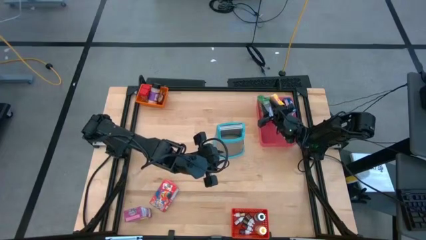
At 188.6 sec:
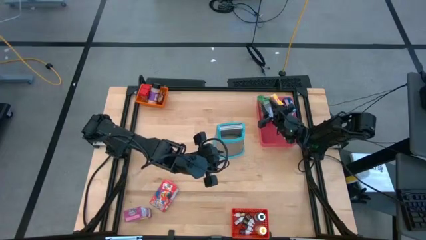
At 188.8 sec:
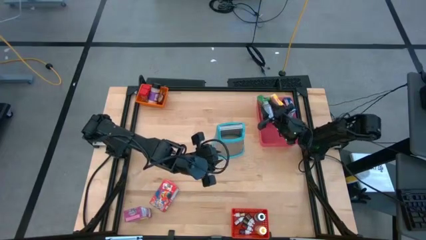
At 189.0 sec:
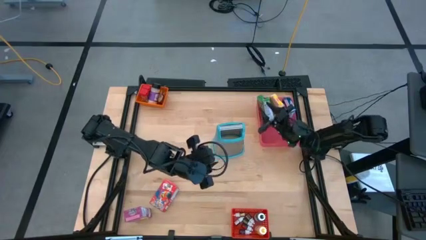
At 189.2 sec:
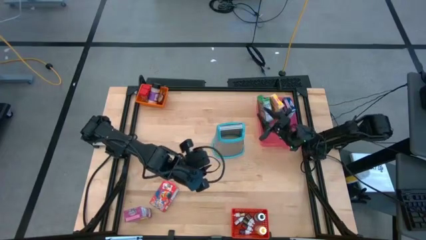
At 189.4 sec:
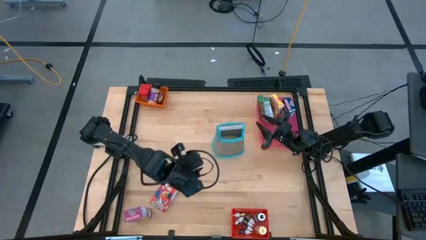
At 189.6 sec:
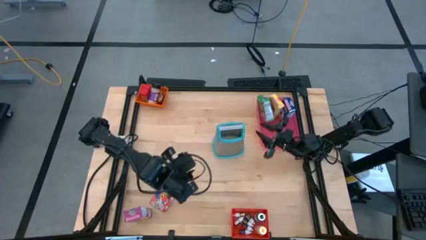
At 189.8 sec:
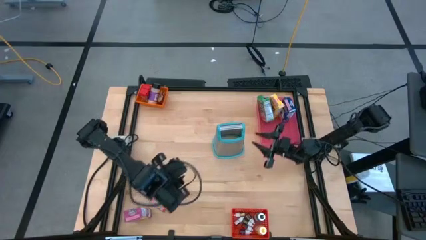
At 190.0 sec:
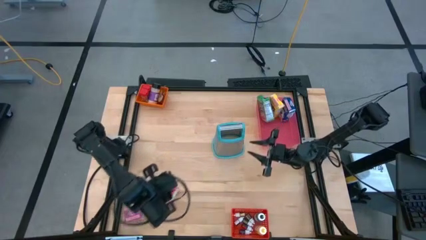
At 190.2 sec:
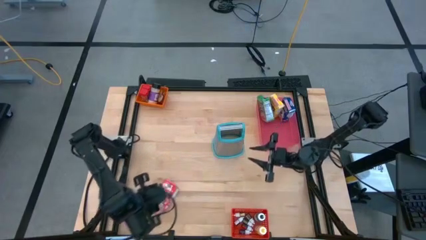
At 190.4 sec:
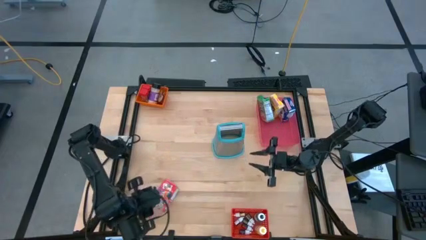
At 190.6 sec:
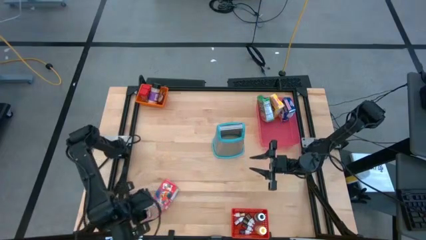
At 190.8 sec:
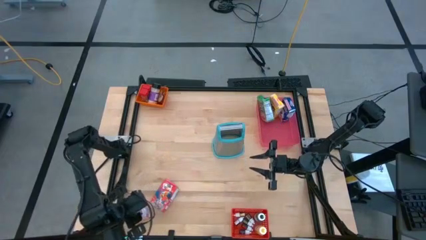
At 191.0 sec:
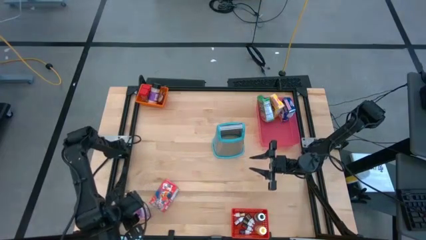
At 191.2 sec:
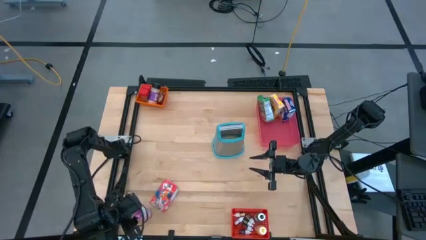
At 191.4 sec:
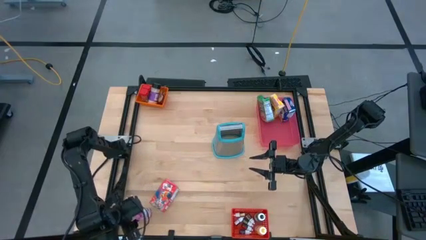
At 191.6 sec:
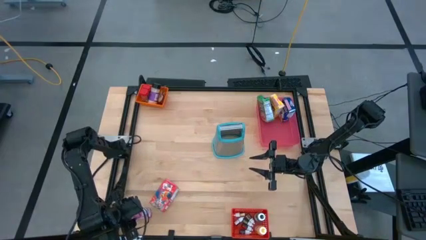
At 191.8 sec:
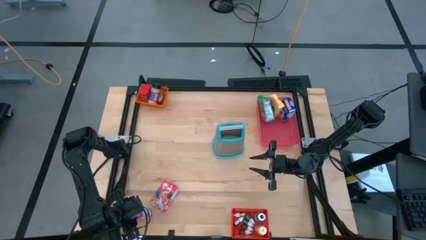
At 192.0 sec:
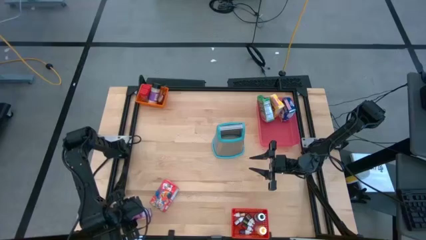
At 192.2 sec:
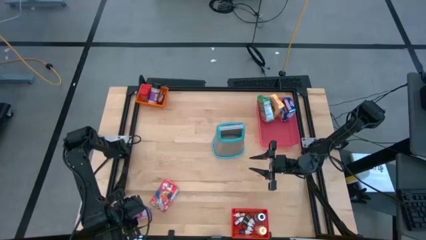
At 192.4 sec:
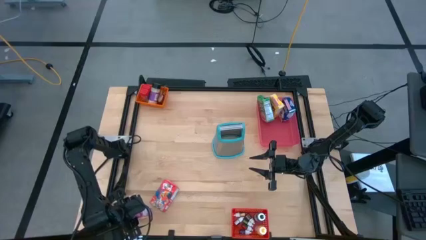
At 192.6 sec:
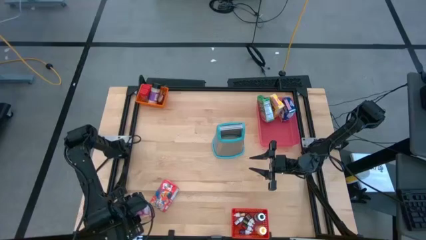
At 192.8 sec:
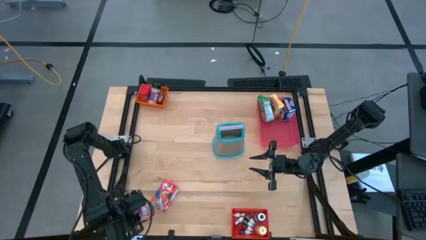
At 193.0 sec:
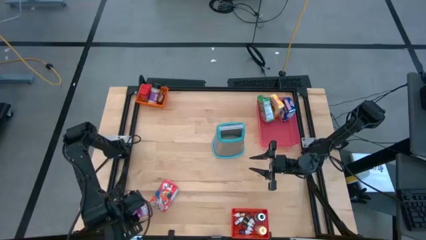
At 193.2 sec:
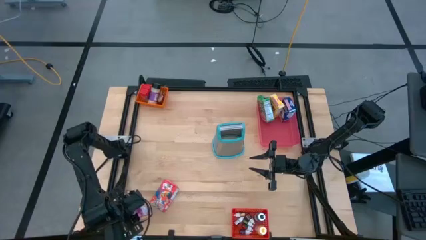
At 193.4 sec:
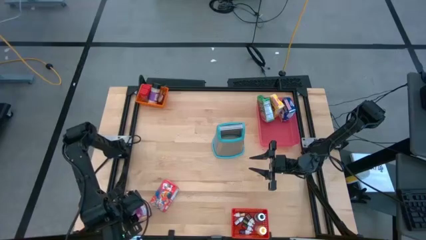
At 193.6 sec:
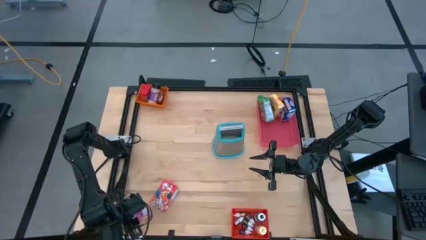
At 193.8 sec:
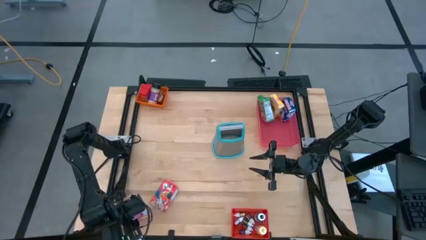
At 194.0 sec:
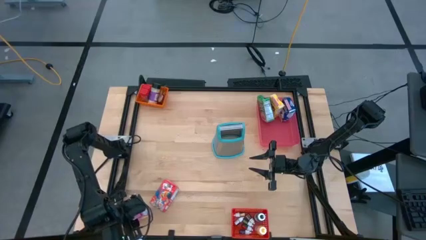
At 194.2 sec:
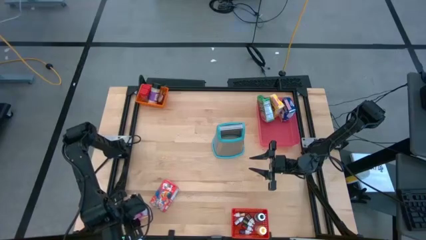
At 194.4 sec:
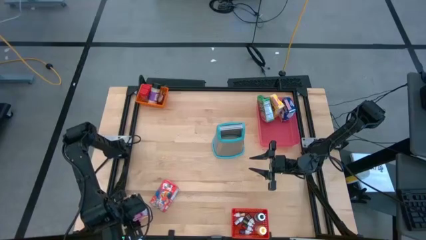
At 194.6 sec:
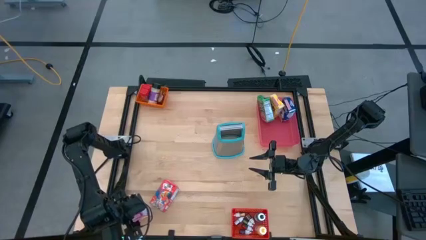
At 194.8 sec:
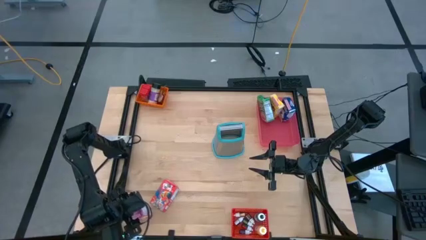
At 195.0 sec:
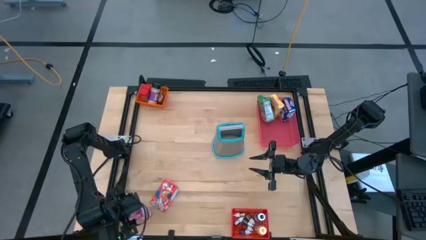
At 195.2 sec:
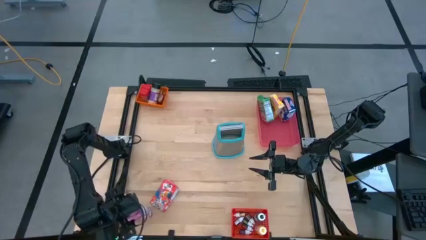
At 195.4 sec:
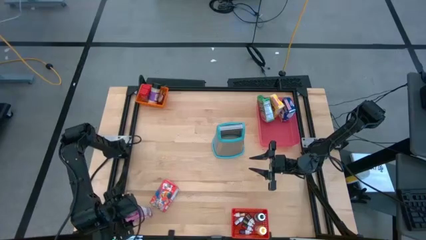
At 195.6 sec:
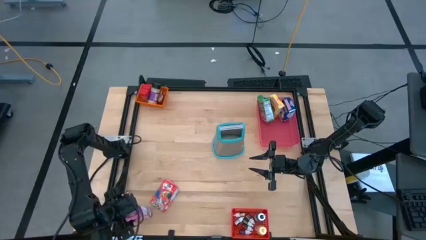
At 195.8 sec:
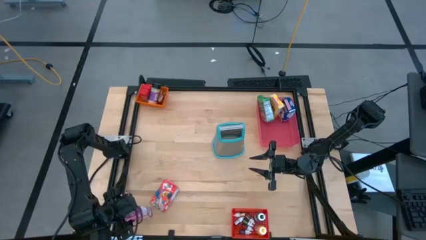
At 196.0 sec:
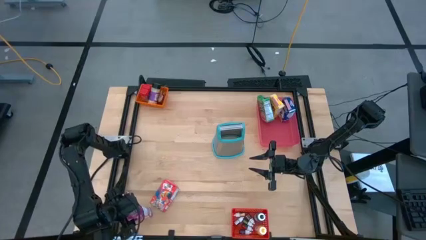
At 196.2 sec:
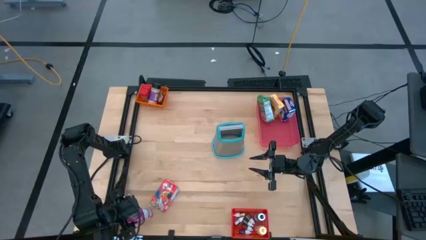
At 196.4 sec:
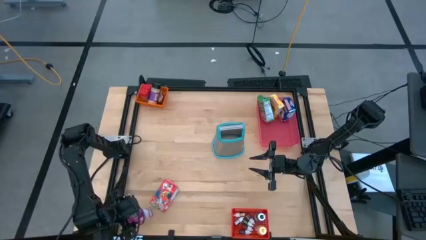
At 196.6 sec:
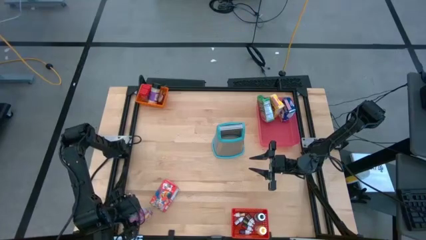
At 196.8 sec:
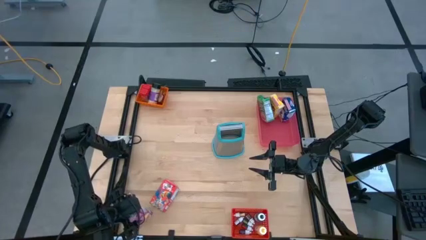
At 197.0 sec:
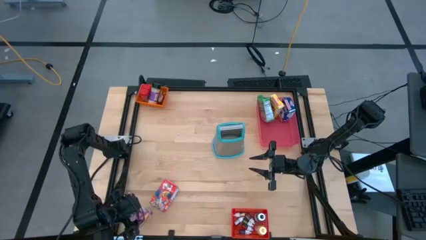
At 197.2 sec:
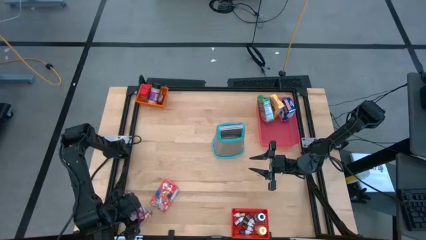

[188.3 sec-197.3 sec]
Task: Pick & Place Kitchen Items
Put the purple cereal box into the pink bin

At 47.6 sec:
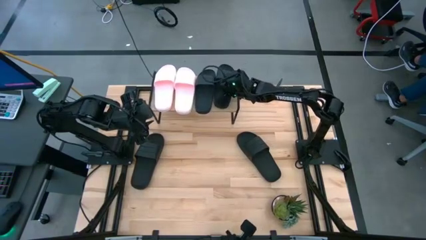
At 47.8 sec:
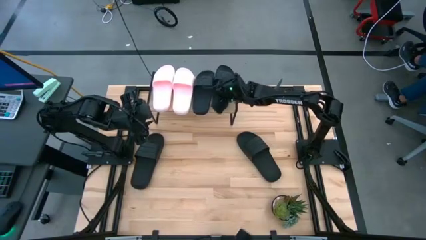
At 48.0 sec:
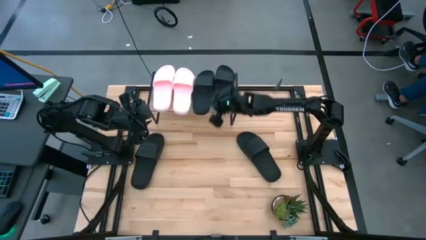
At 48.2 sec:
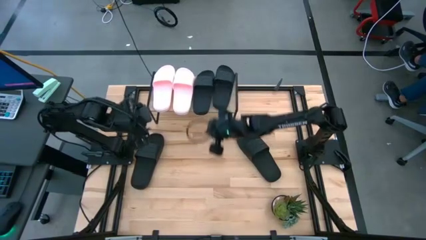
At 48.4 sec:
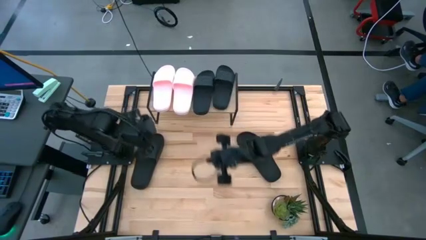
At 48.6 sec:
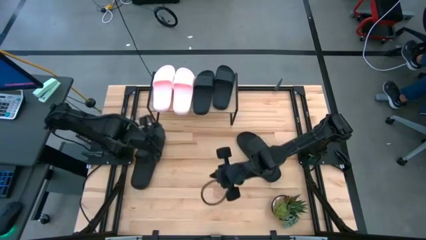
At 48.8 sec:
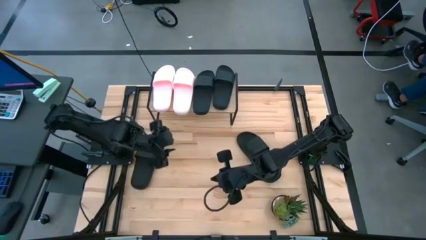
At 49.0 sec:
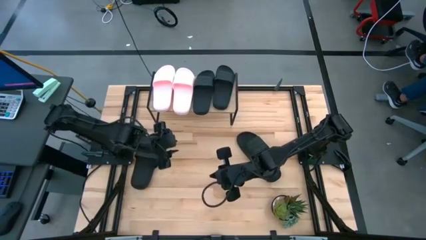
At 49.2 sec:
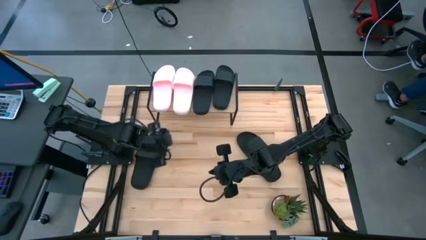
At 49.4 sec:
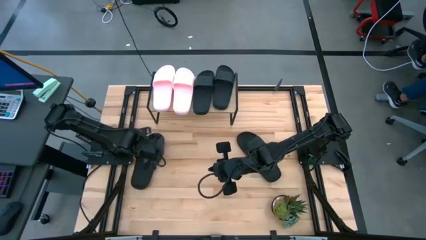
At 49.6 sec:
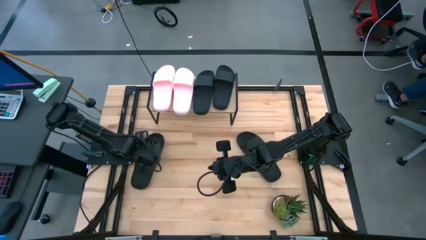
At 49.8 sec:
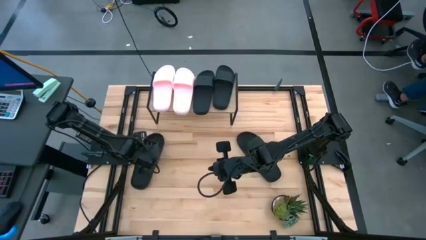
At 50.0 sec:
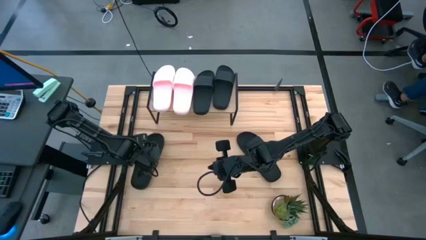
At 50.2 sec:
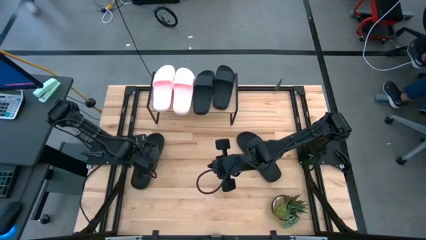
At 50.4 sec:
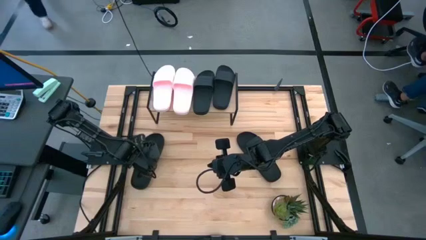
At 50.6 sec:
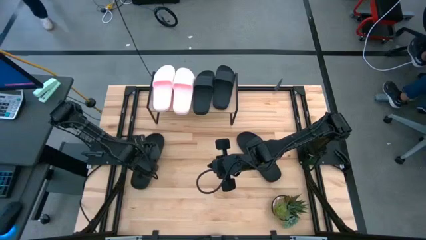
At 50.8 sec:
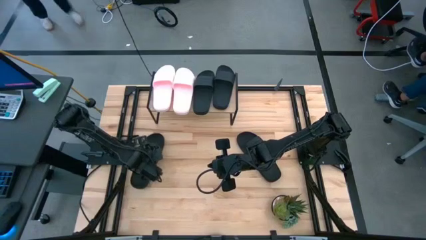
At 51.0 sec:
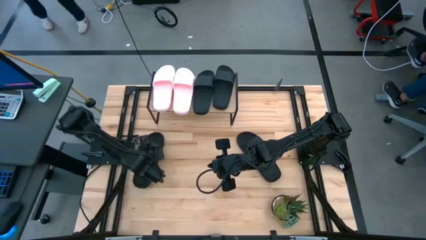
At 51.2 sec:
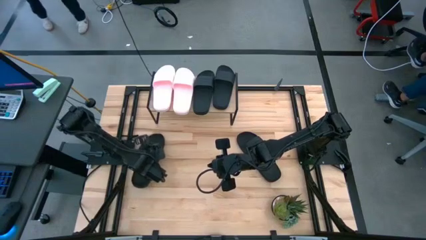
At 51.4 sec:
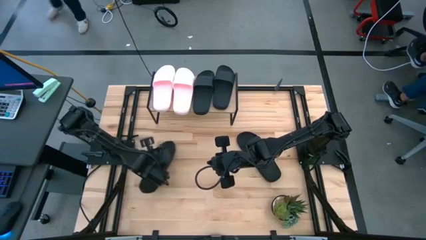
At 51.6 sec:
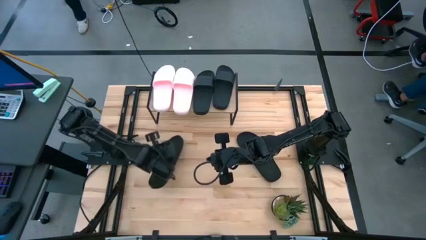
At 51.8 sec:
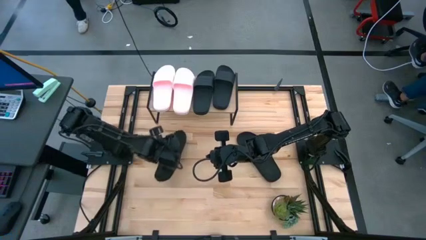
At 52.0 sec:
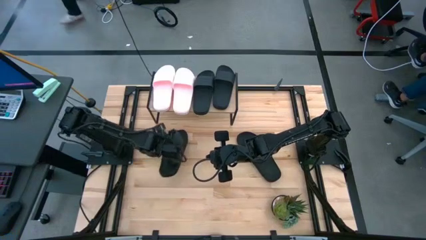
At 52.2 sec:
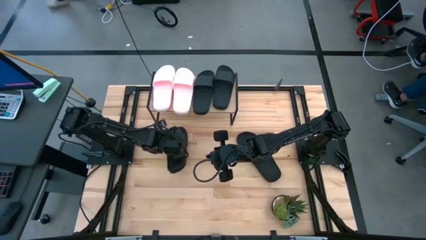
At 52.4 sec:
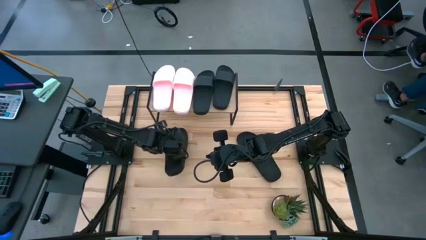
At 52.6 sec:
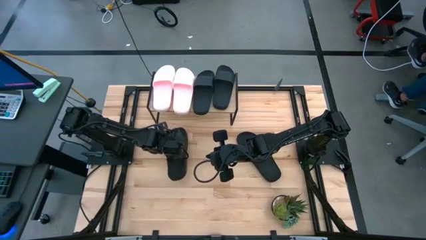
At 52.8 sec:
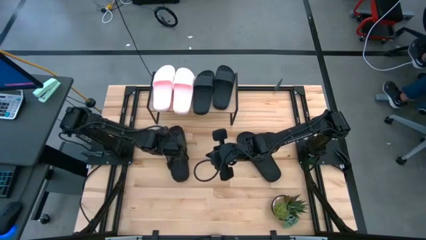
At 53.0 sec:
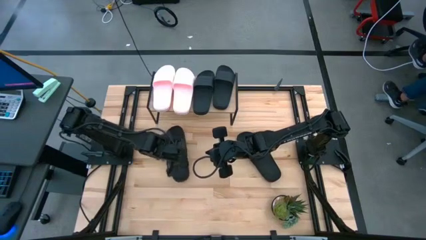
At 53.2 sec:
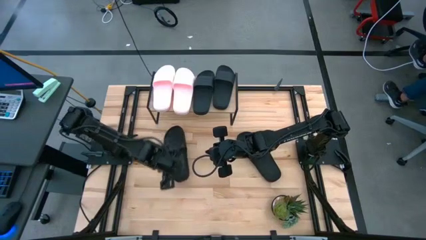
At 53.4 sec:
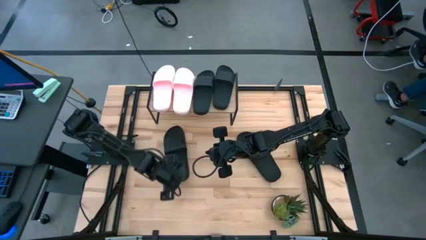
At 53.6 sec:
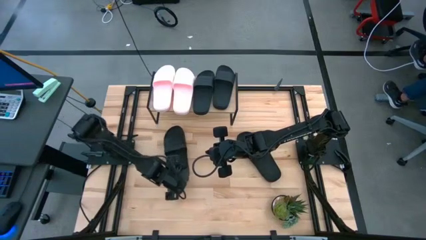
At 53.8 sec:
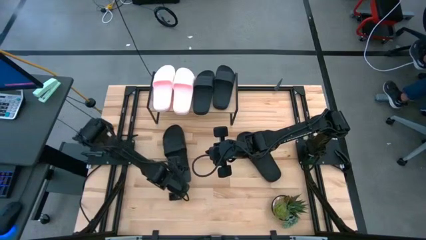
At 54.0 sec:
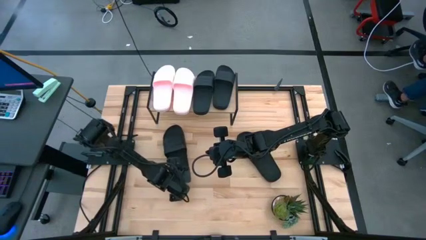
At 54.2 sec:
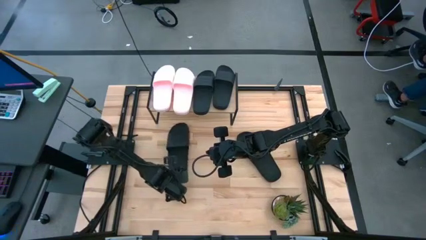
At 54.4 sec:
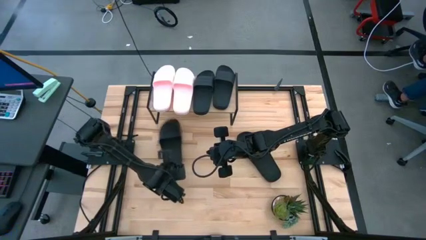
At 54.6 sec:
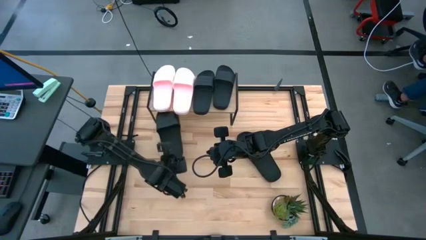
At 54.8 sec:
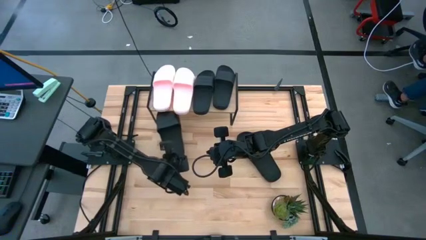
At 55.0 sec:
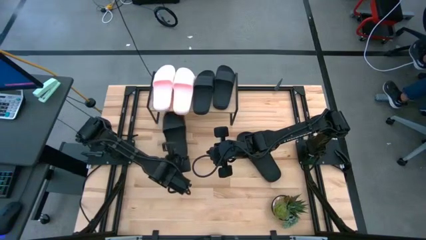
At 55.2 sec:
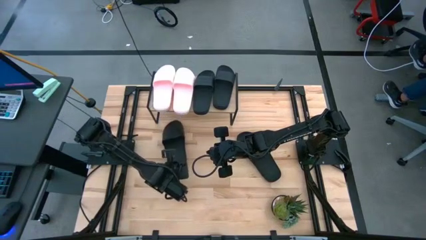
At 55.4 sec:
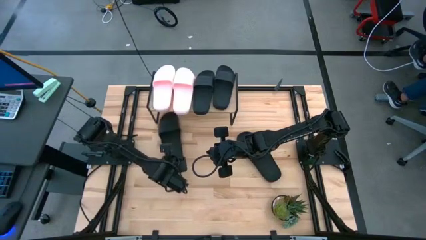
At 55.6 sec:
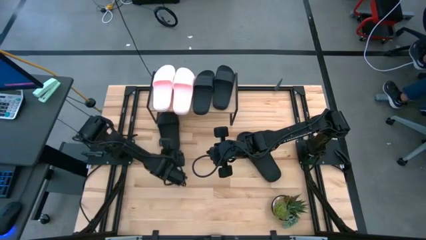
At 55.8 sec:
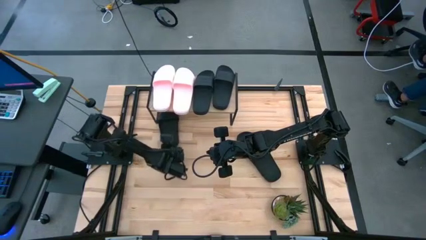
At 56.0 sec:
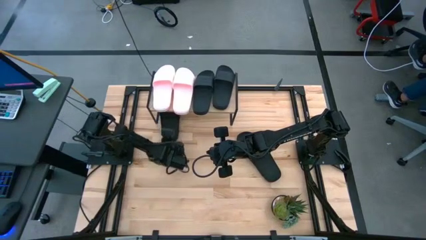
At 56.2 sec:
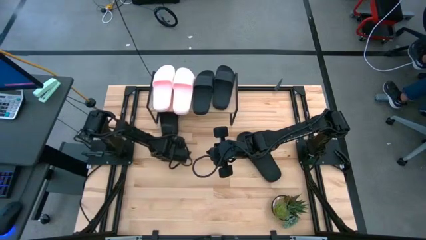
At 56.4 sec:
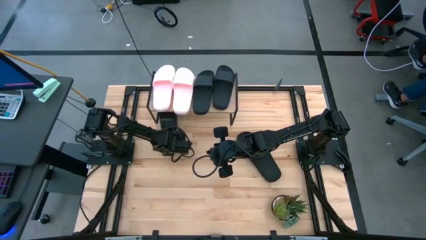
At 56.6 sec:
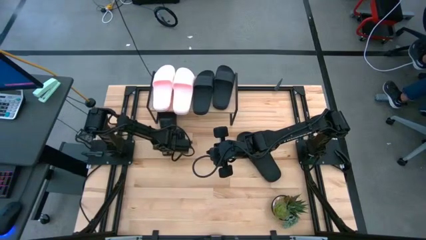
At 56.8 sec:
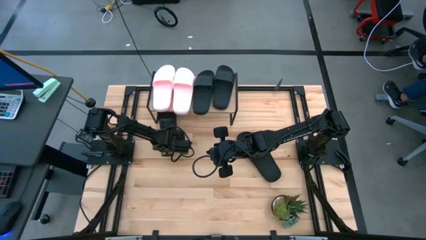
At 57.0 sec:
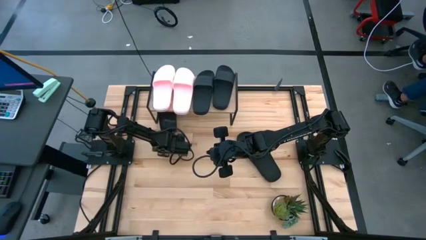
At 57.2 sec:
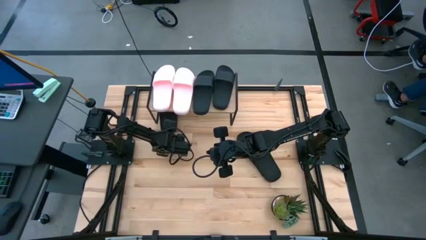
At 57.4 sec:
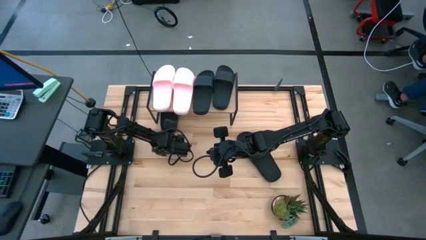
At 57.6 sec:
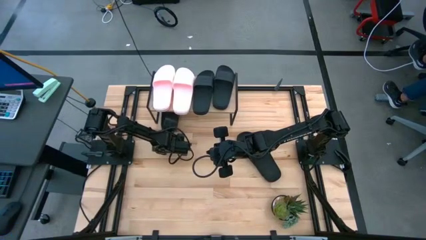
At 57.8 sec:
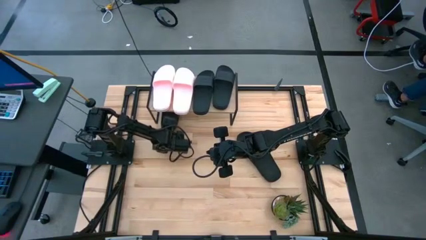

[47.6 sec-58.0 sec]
Task: Pick and place slides into the shelf
Put the black slide under the shelf
